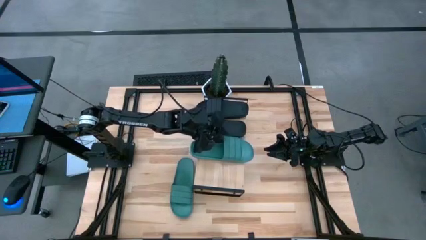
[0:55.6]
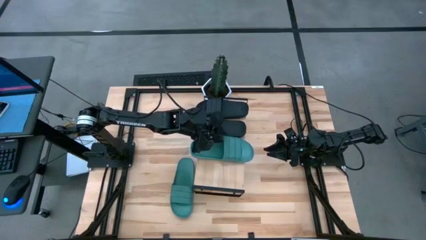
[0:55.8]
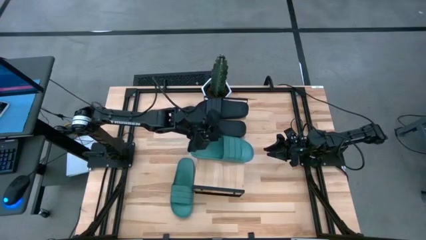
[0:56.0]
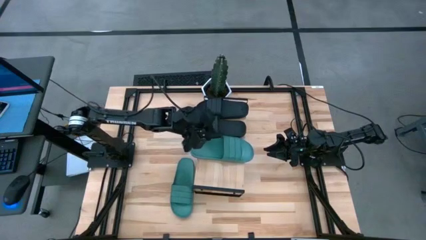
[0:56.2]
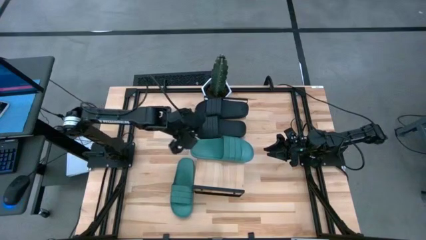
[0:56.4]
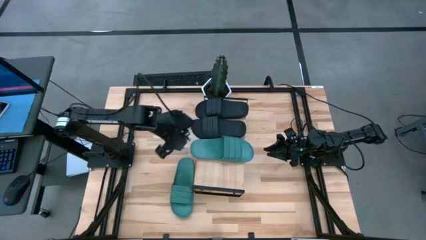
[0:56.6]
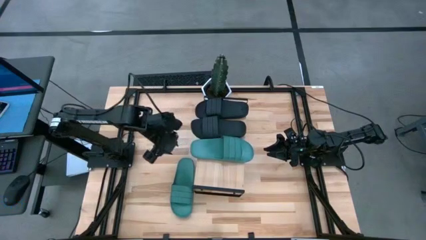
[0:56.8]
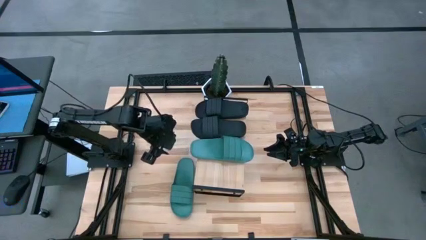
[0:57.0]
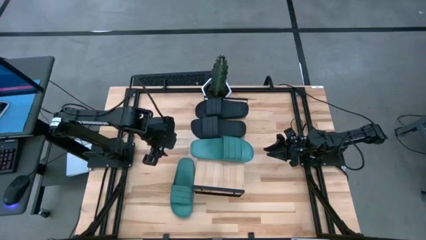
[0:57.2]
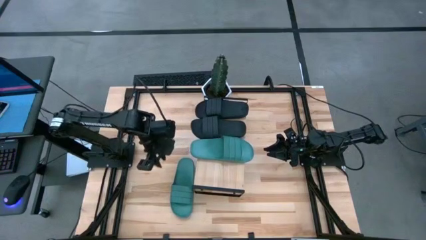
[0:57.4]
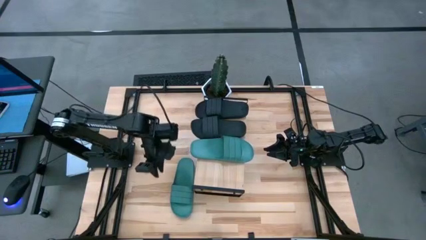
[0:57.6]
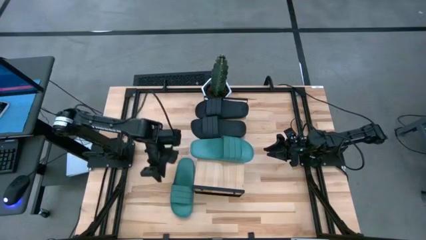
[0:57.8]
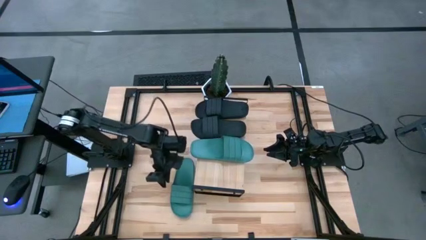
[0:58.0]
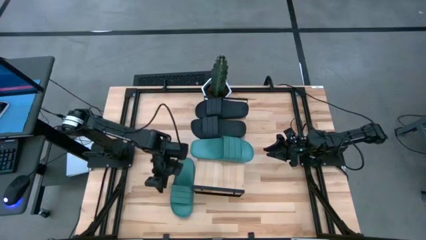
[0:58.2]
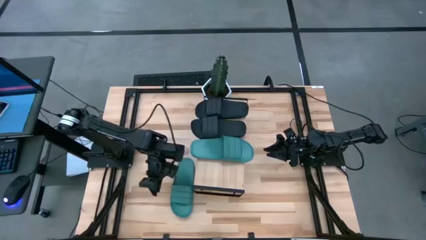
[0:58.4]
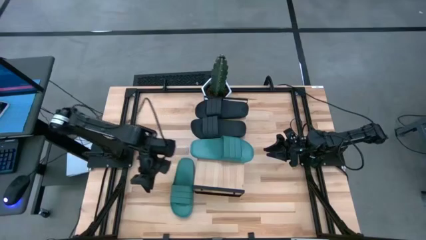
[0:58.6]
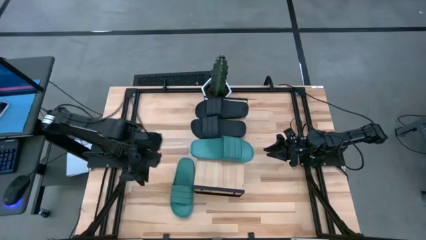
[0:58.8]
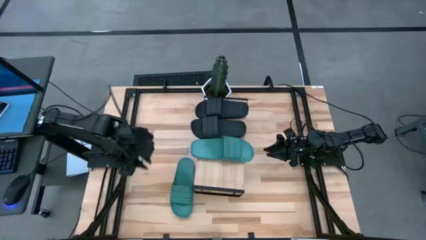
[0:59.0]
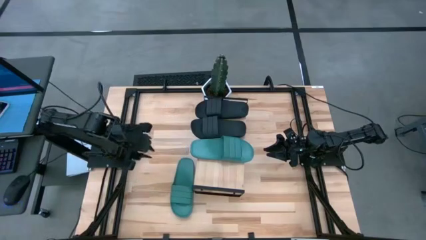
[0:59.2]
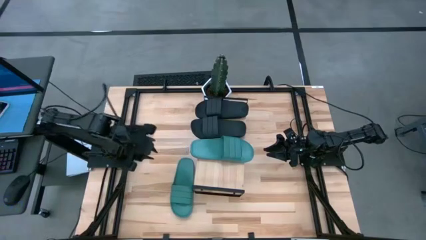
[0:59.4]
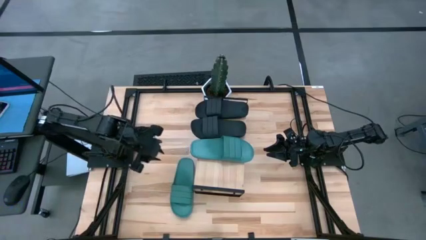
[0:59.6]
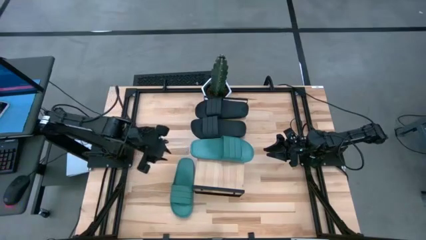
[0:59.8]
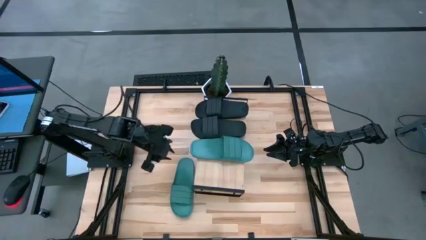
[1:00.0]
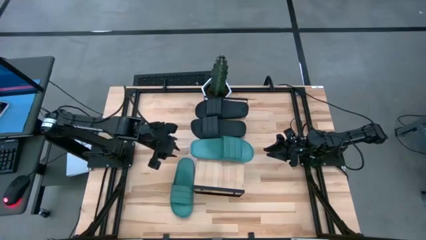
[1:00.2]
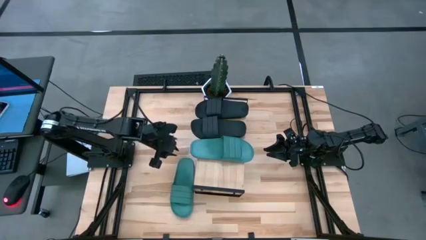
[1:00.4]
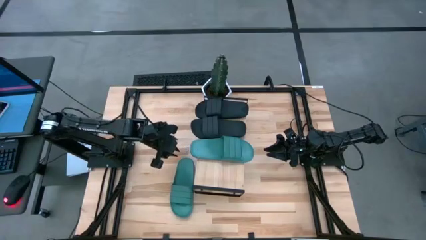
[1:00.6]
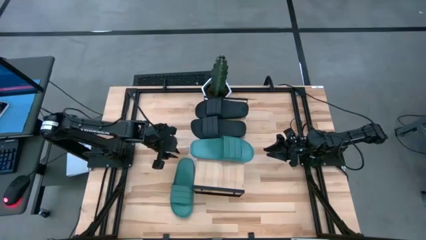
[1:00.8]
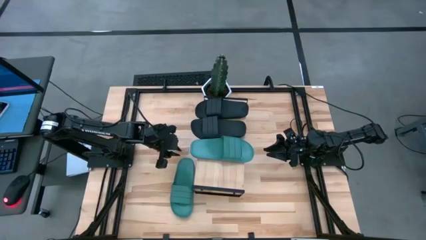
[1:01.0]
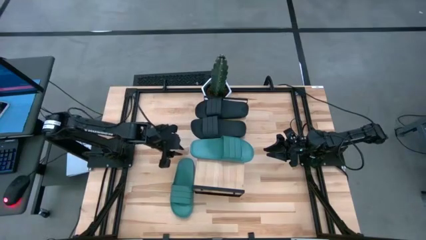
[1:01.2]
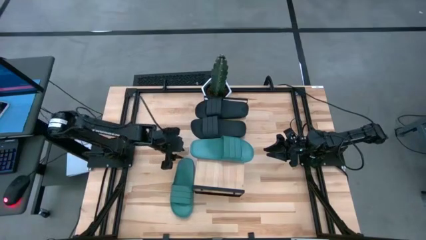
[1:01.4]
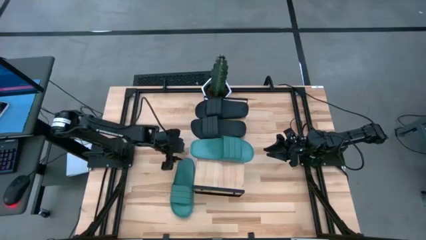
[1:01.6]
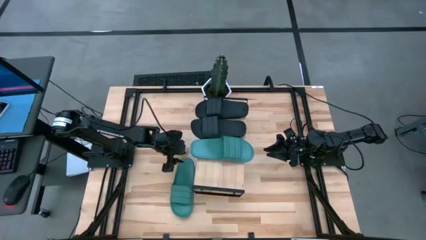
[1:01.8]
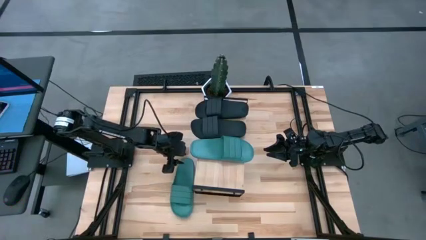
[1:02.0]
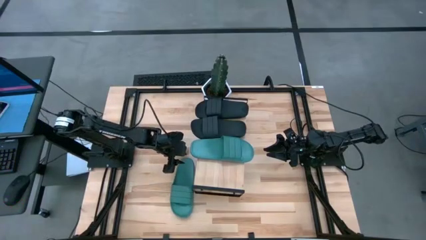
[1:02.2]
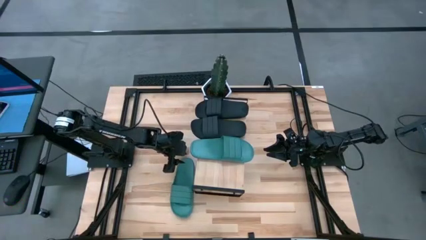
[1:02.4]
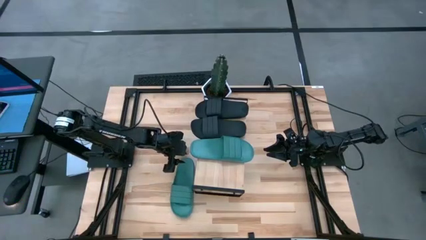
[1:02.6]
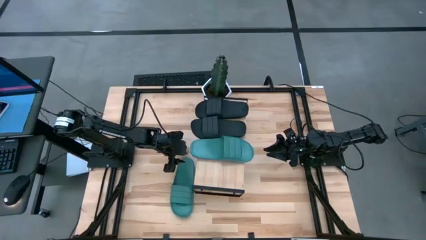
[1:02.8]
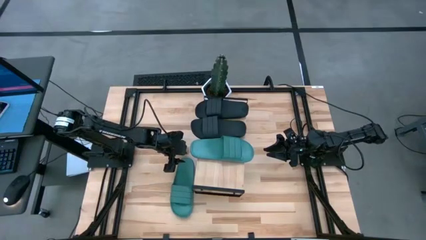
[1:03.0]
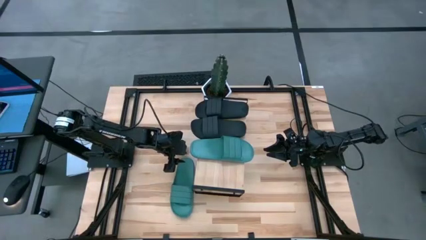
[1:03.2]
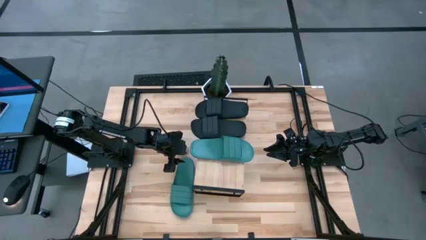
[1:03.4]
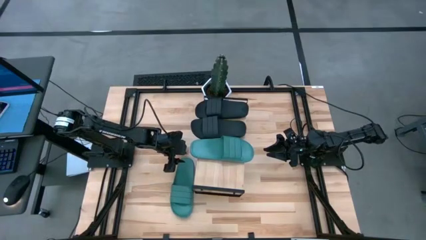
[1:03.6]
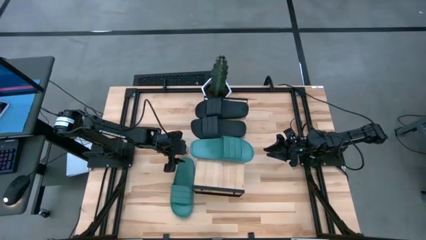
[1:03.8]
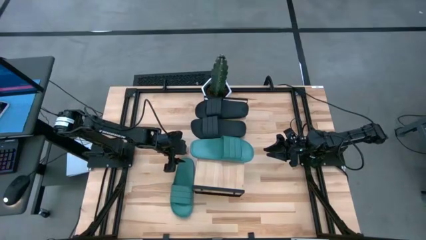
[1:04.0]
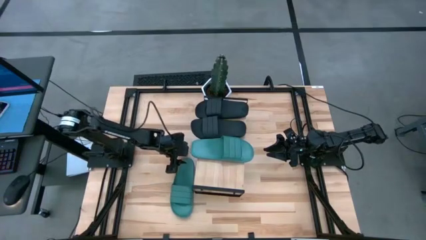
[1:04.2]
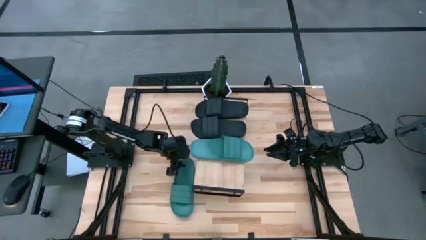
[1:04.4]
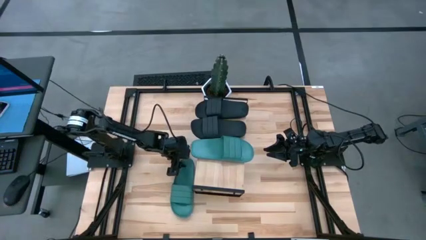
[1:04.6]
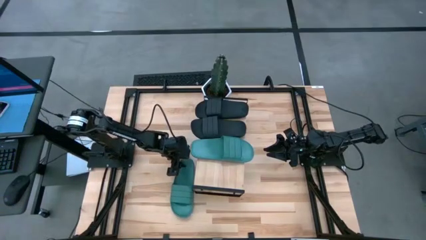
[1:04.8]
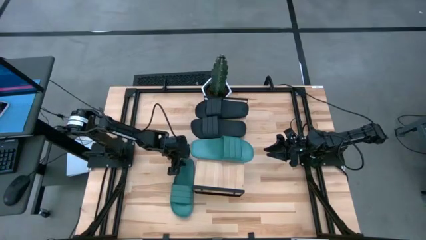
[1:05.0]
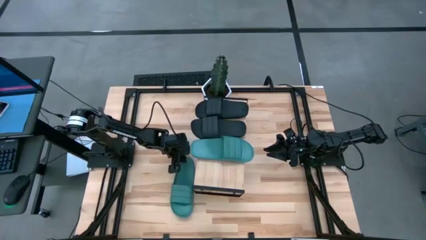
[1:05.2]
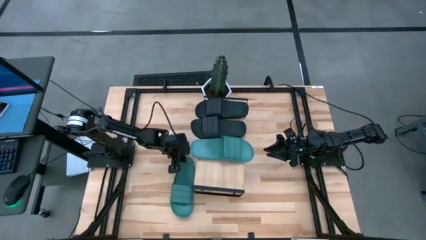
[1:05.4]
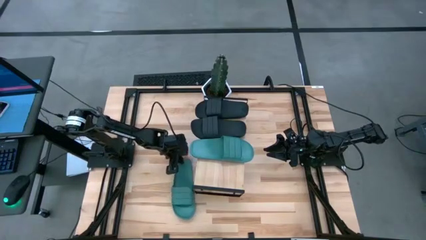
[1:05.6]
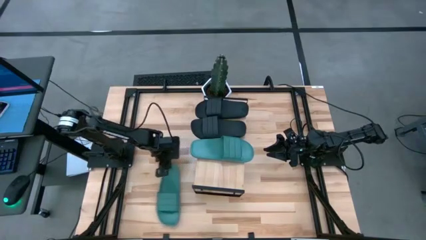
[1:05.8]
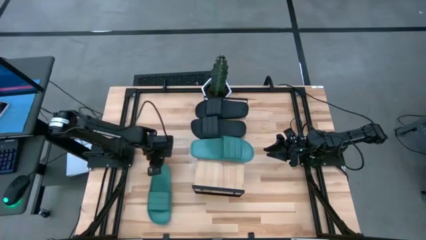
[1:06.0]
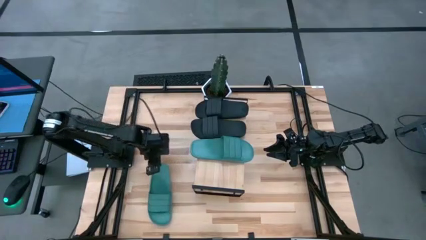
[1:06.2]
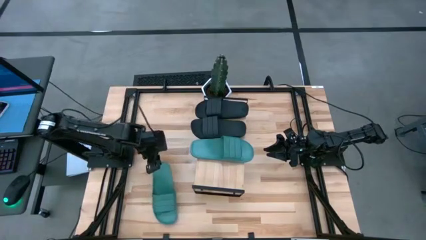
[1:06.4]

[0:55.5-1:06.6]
Task: Pick and place slides into the shelf
Put the green slipper on the shelf

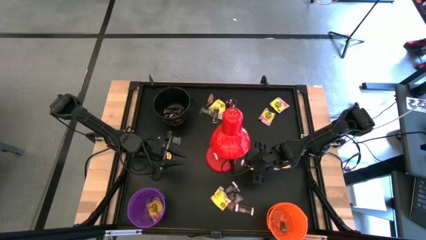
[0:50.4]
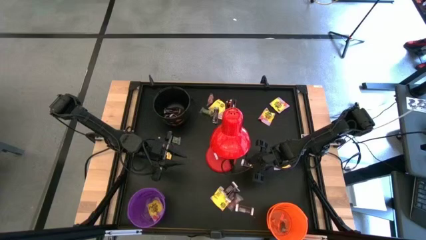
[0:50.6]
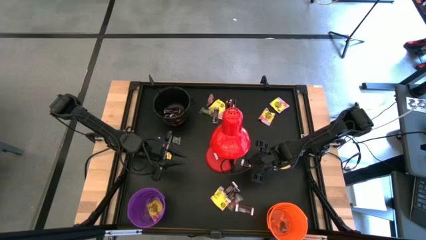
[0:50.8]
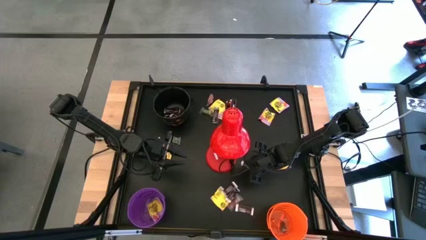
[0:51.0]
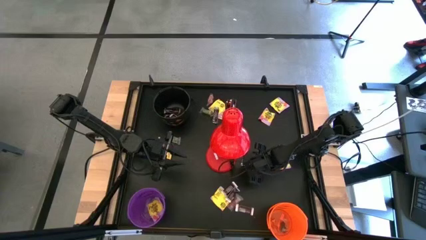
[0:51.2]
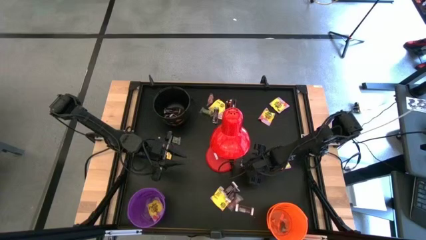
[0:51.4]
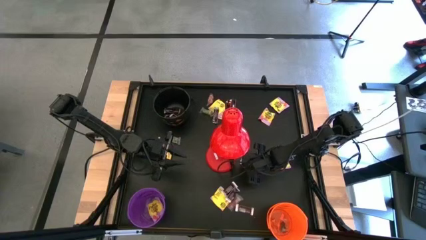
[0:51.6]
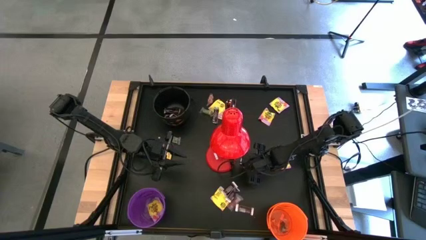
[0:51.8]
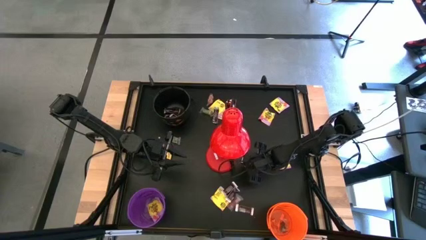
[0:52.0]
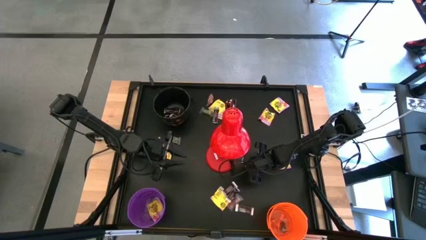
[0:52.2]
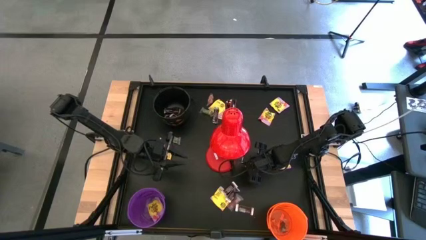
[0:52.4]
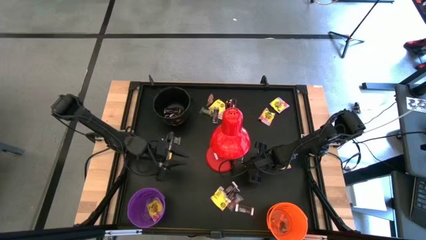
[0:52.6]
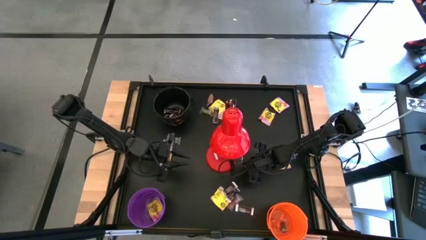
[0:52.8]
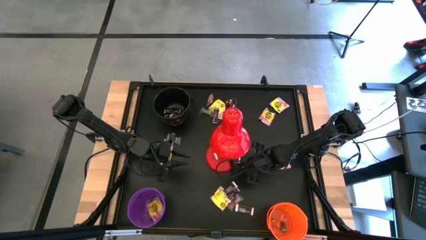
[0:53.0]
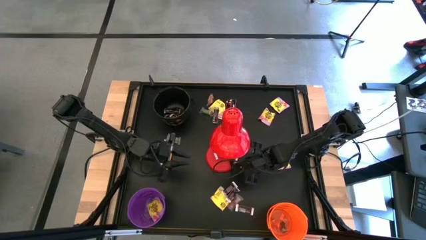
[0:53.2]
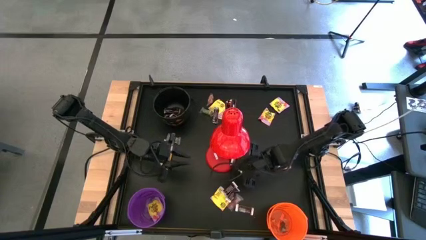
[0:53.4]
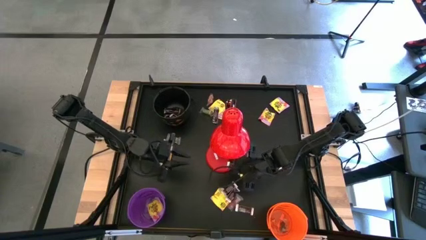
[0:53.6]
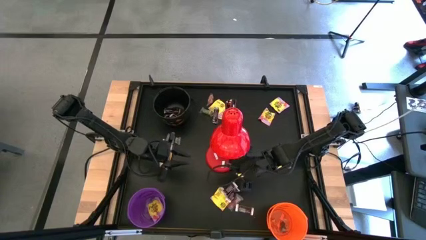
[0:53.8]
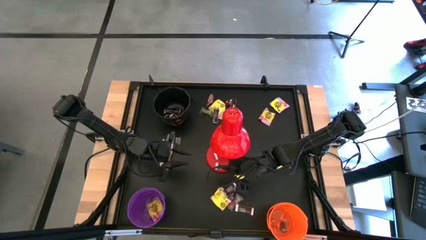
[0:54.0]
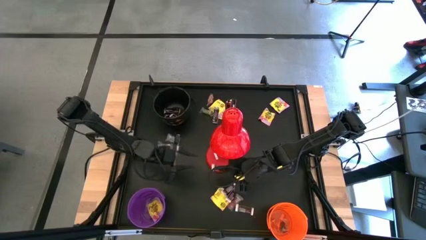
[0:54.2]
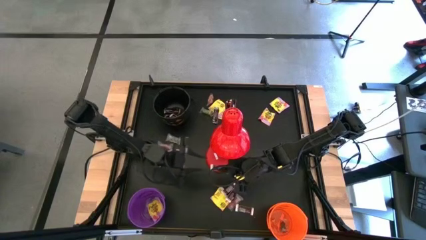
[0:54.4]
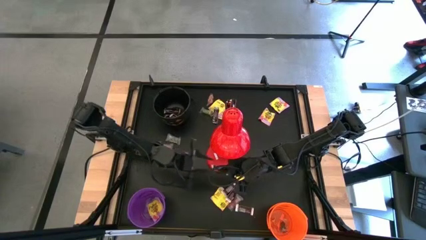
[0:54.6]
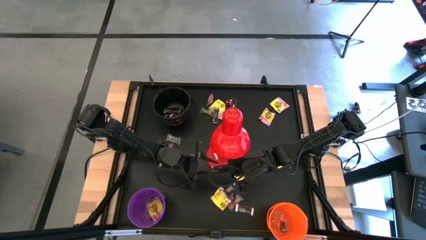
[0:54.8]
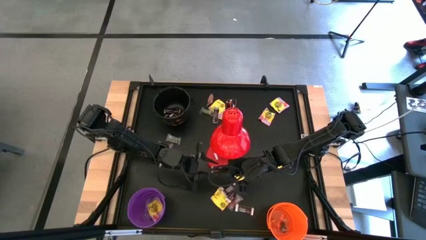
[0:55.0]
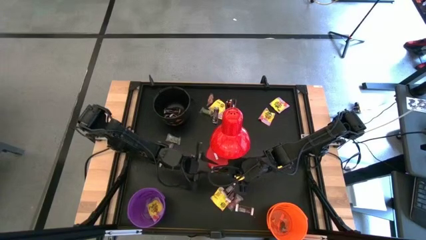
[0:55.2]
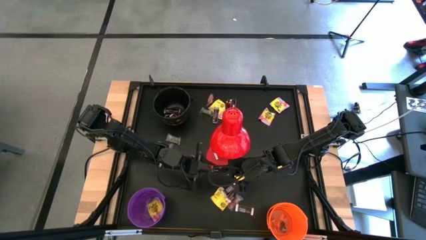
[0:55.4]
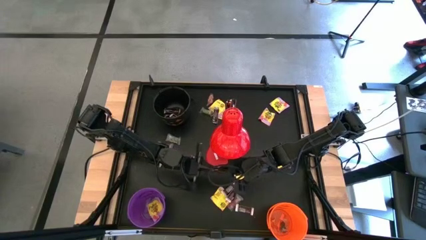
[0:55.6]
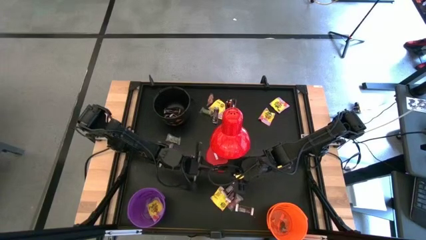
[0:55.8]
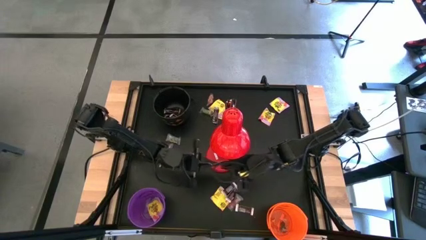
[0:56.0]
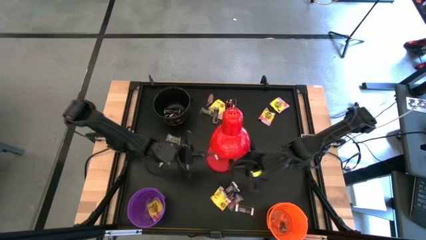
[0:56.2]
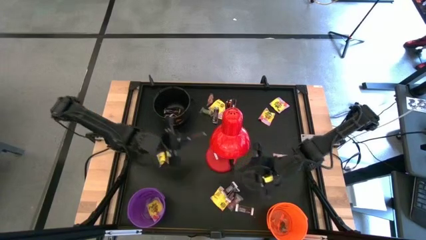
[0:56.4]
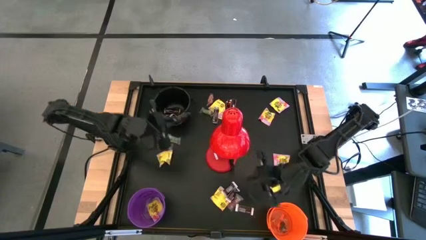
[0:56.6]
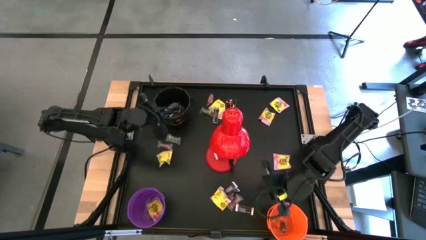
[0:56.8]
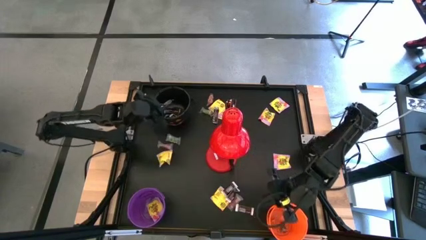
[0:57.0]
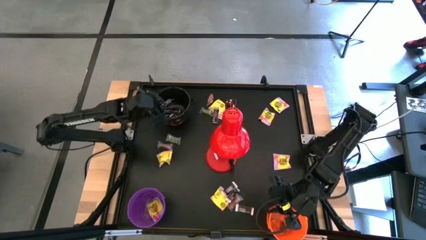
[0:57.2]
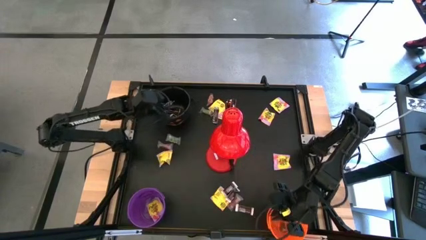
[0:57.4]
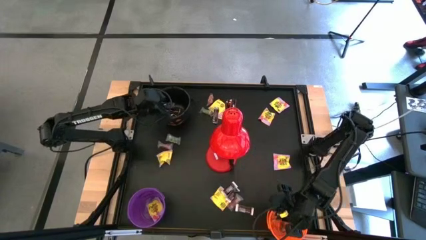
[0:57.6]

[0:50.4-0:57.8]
Task: Organize candy in baskets
Put the brown chocolate bar into the black bucket
